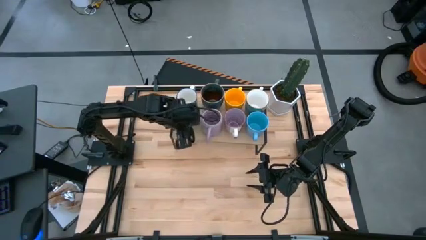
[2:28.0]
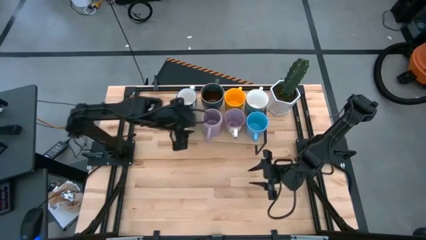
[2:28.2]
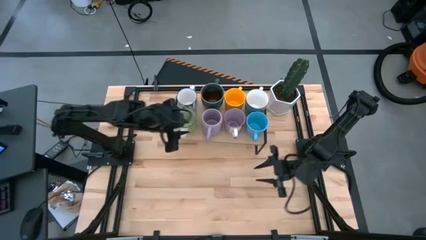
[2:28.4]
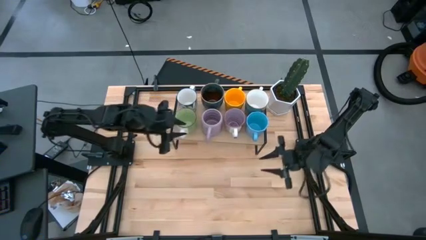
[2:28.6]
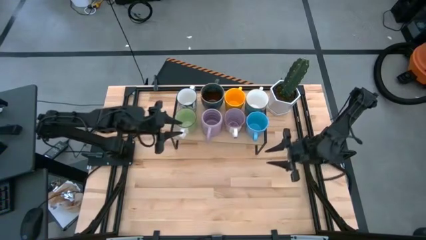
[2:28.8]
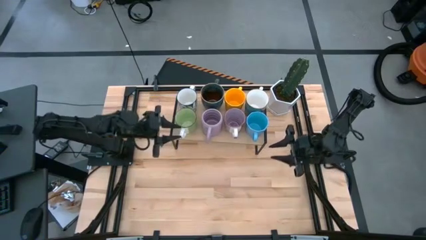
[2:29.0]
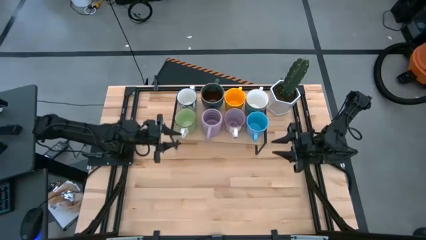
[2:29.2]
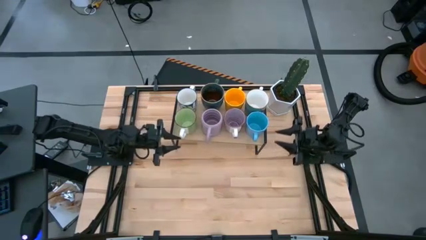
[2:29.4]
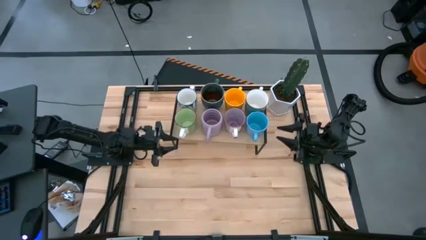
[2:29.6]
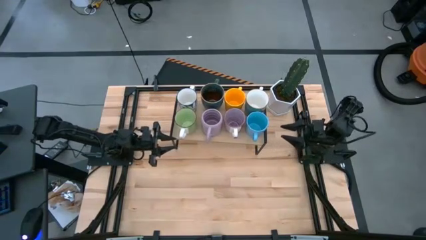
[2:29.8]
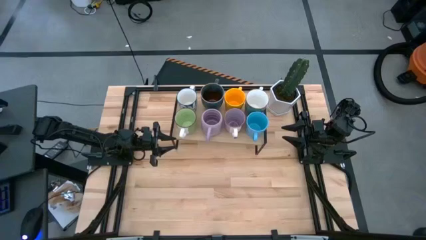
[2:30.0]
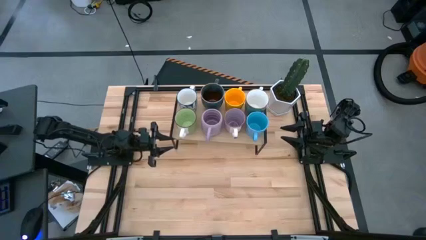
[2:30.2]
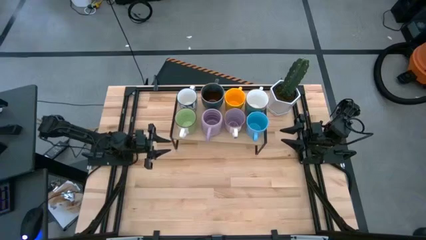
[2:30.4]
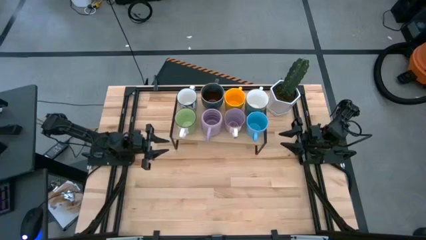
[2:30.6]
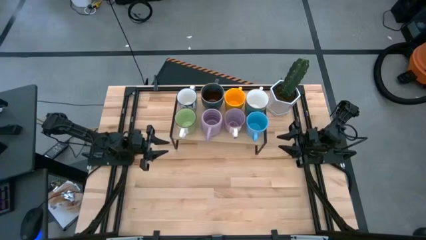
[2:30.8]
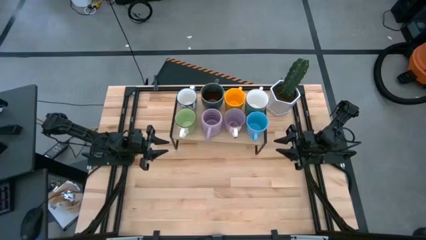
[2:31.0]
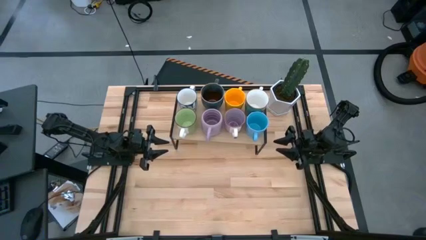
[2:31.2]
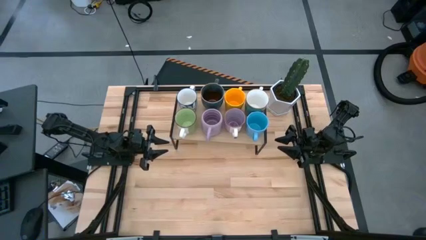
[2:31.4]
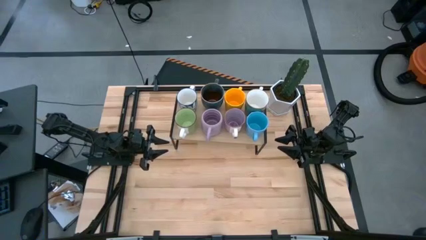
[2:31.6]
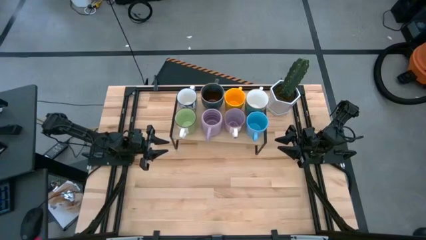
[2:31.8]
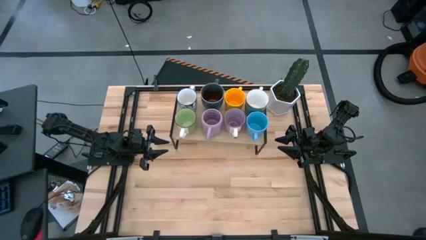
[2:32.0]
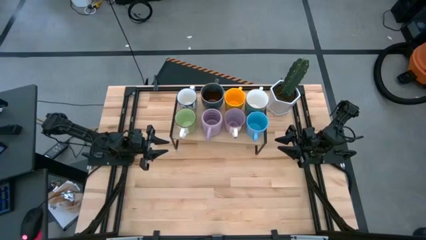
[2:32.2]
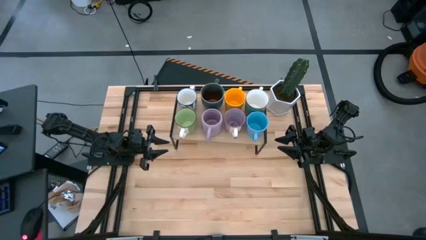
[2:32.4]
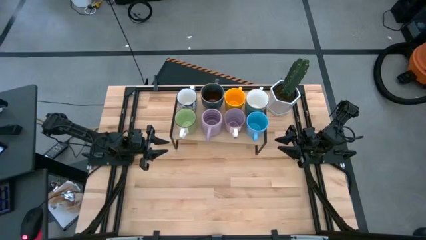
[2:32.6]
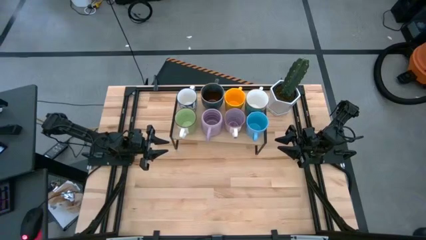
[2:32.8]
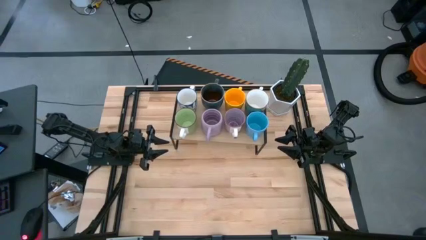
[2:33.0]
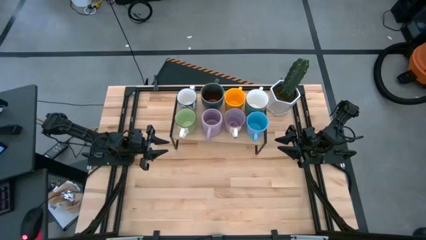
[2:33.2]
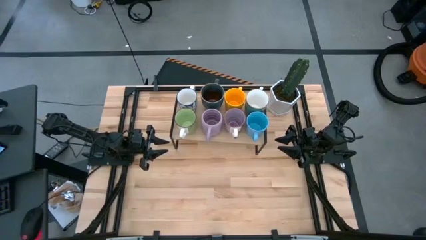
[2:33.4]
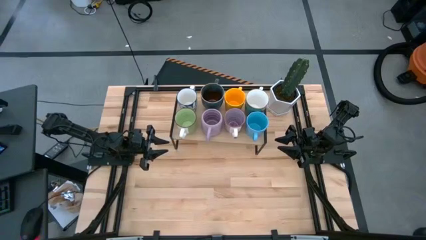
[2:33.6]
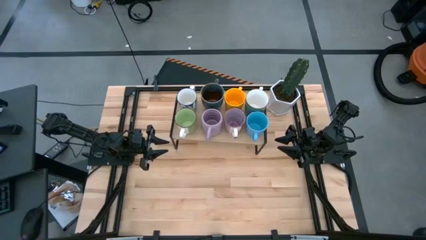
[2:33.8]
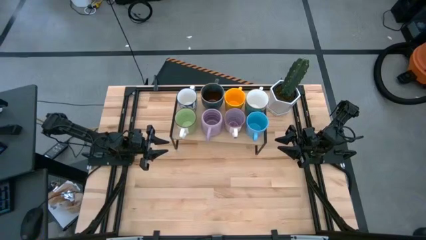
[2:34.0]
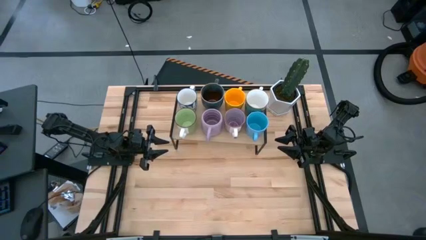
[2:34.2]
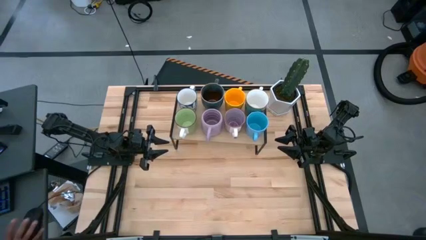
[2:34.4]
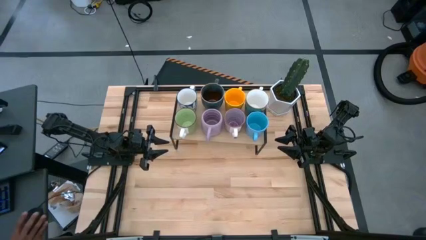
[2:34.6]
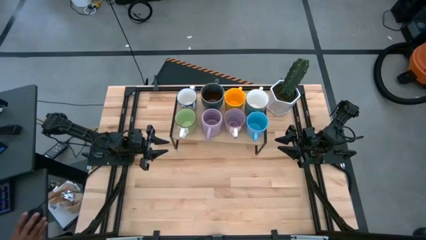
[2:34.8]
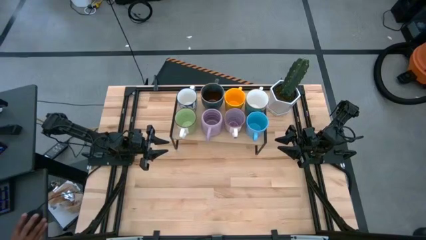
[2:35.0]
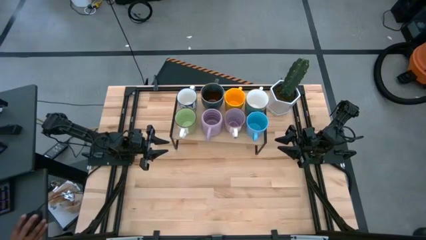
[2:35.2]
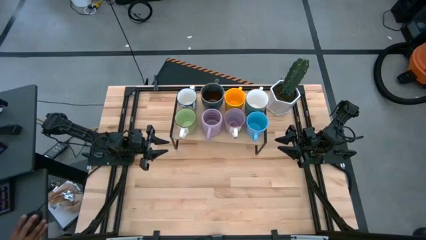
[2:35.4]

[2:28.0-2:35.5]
Task: Place coffee mugs
Return to Home Position

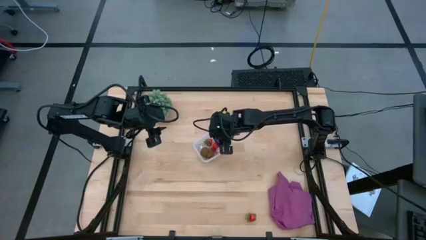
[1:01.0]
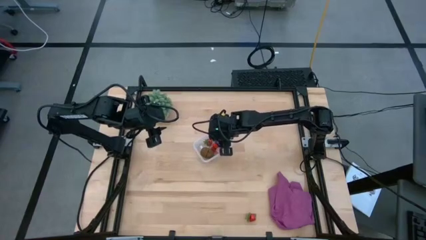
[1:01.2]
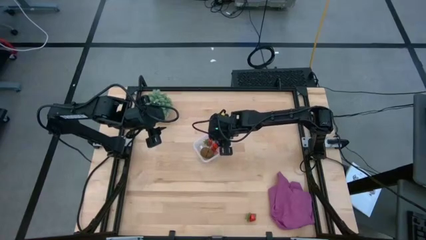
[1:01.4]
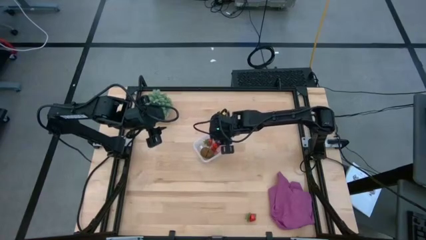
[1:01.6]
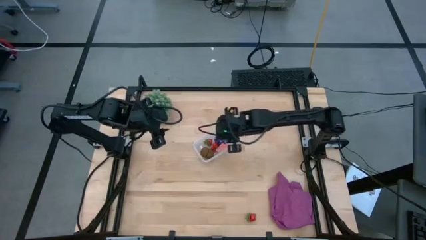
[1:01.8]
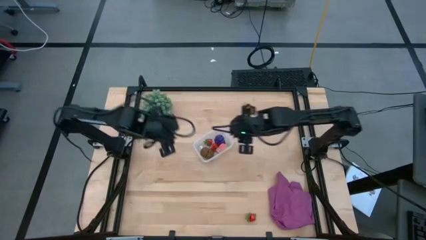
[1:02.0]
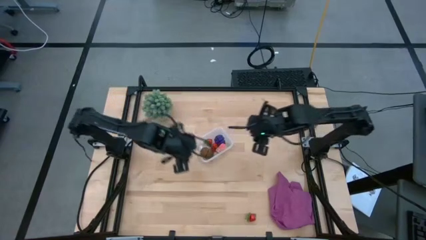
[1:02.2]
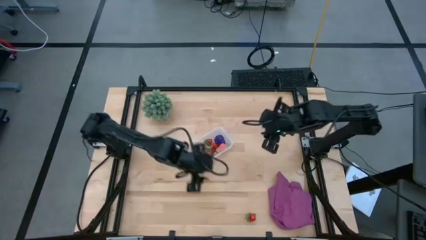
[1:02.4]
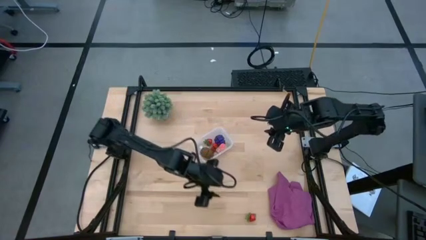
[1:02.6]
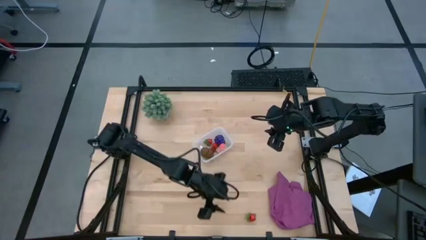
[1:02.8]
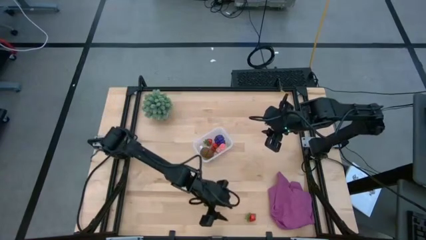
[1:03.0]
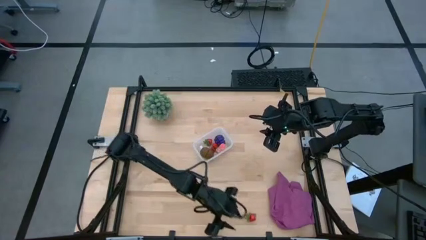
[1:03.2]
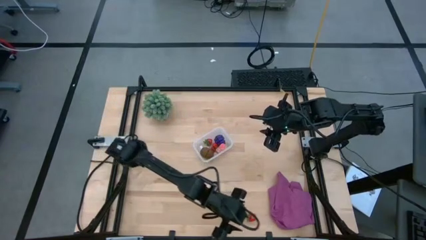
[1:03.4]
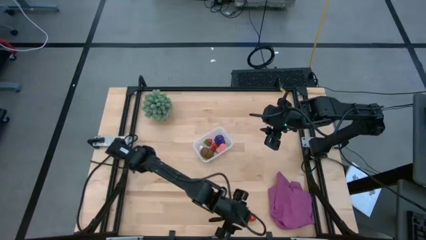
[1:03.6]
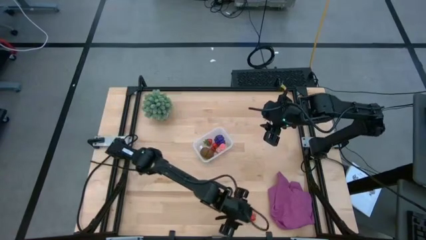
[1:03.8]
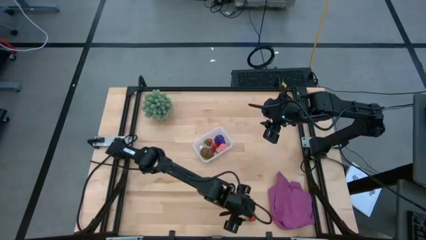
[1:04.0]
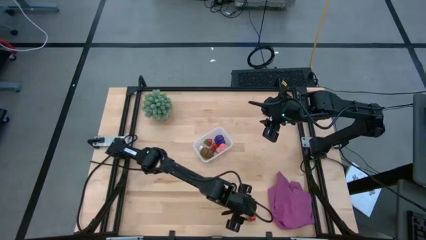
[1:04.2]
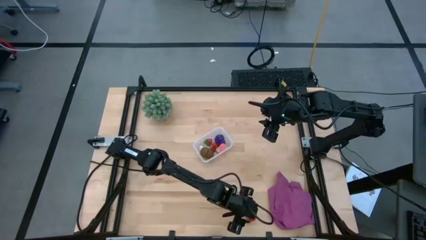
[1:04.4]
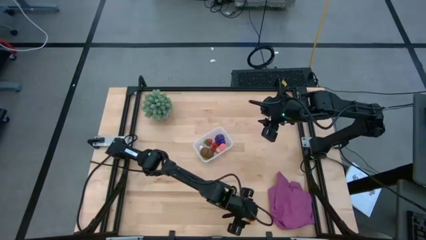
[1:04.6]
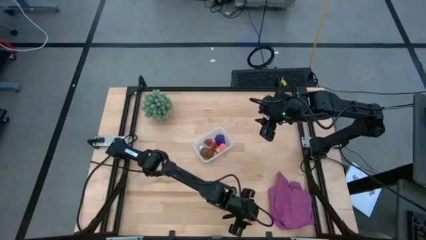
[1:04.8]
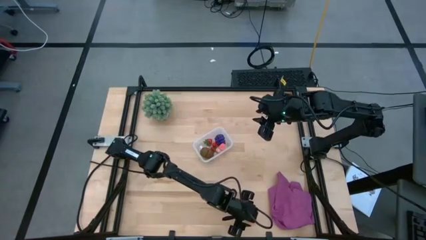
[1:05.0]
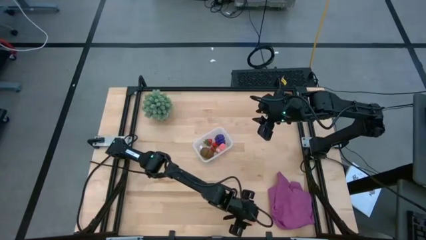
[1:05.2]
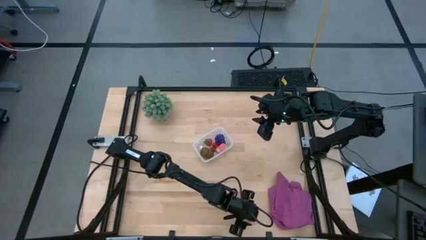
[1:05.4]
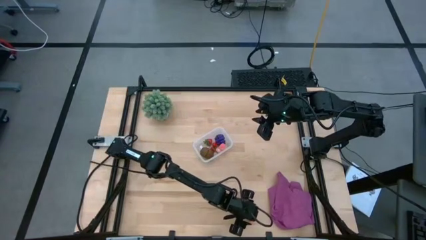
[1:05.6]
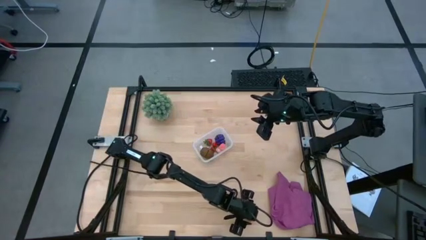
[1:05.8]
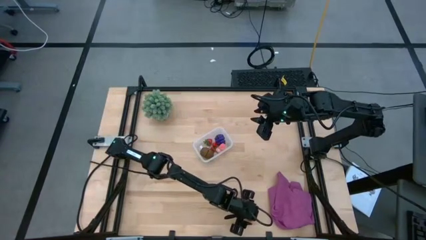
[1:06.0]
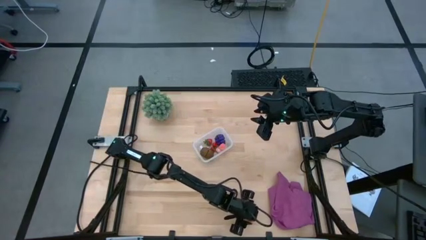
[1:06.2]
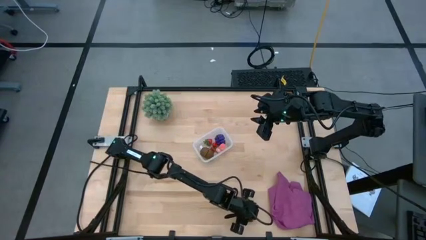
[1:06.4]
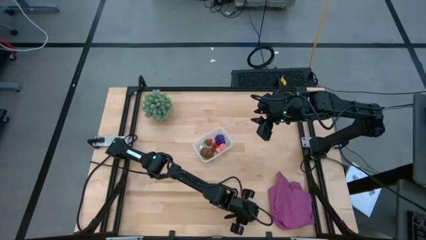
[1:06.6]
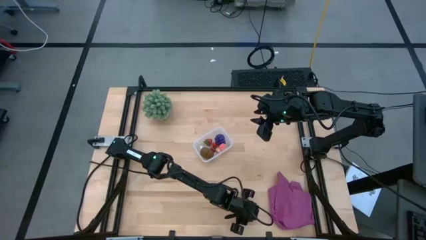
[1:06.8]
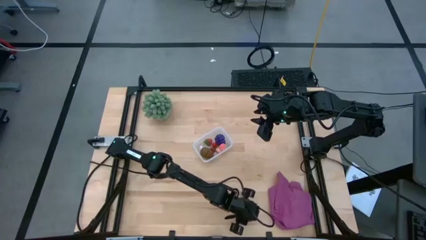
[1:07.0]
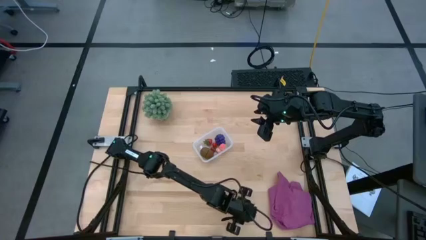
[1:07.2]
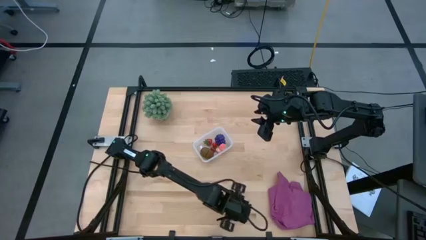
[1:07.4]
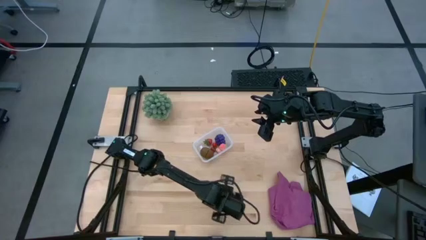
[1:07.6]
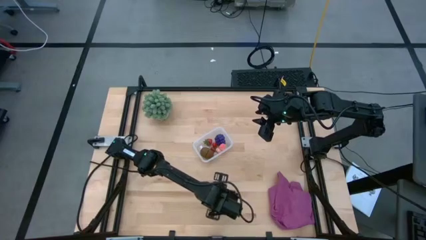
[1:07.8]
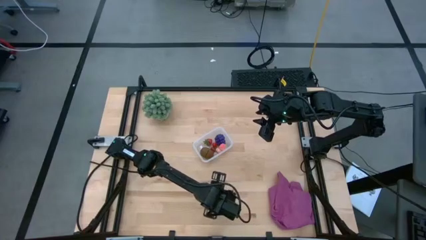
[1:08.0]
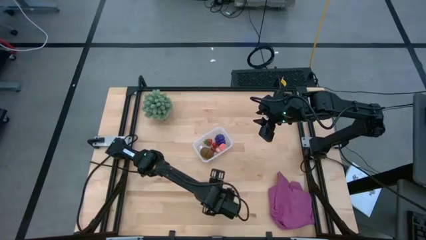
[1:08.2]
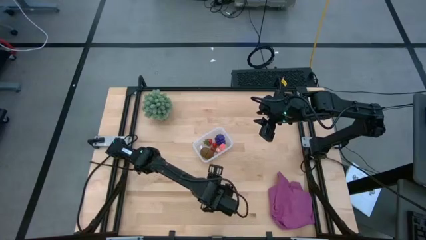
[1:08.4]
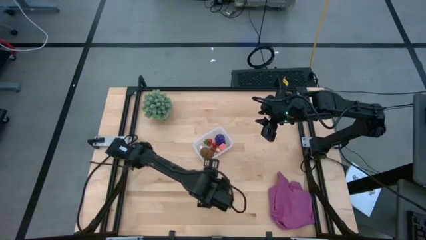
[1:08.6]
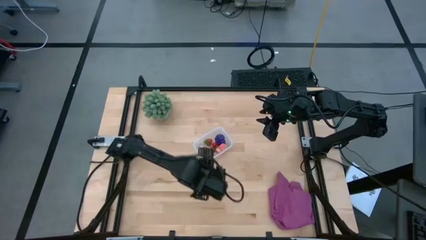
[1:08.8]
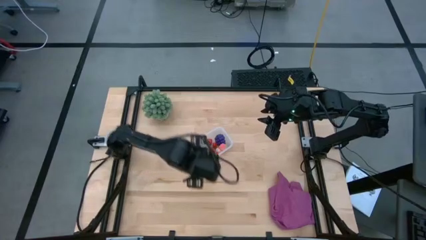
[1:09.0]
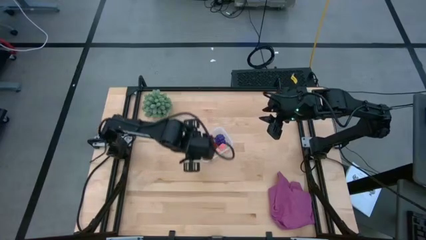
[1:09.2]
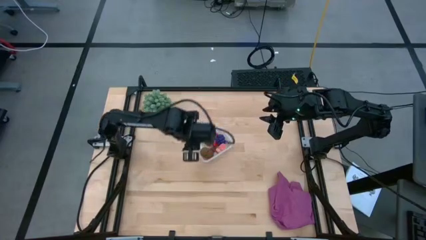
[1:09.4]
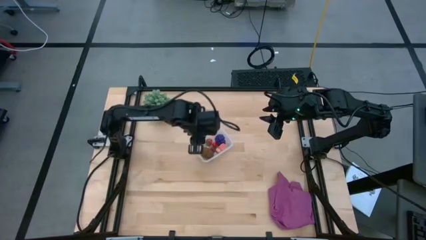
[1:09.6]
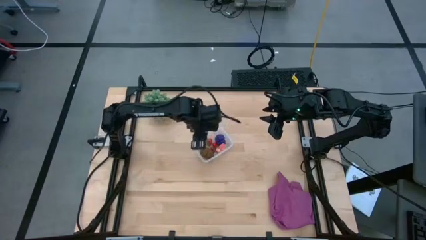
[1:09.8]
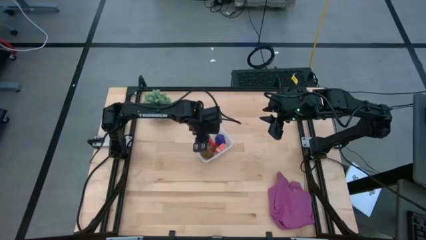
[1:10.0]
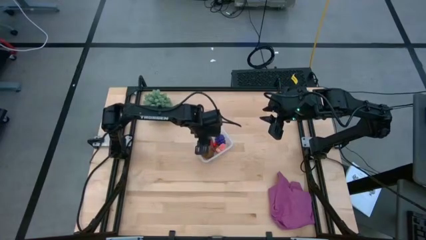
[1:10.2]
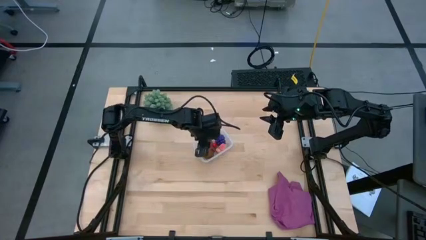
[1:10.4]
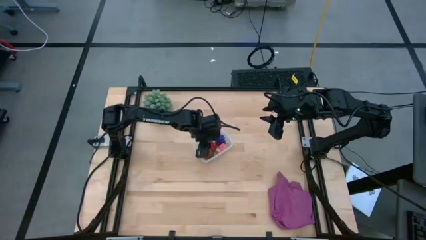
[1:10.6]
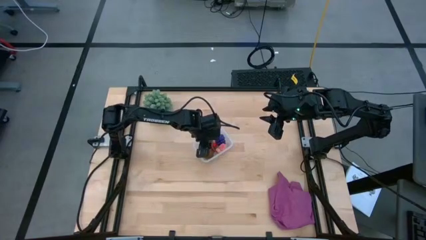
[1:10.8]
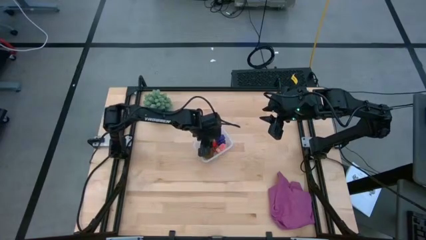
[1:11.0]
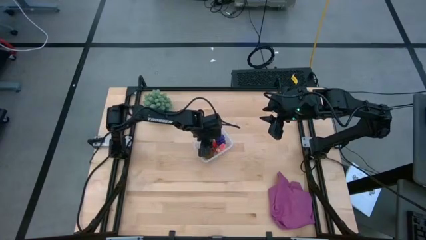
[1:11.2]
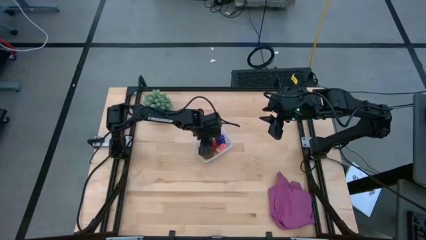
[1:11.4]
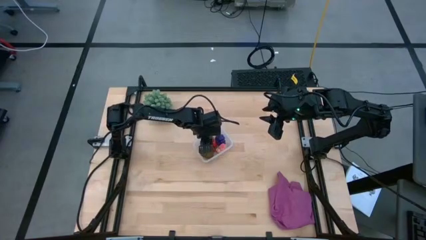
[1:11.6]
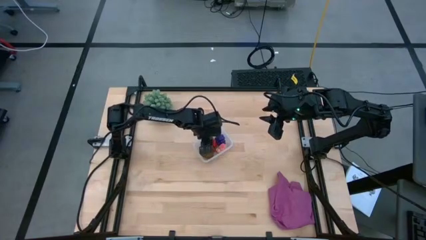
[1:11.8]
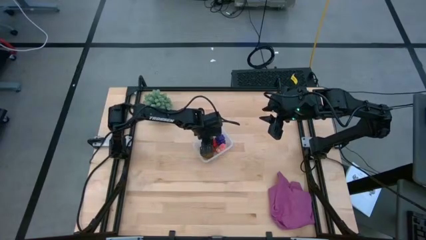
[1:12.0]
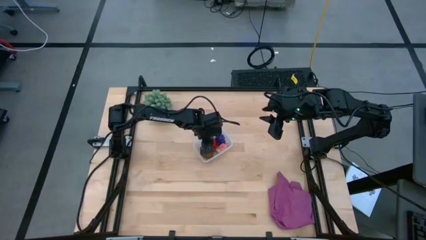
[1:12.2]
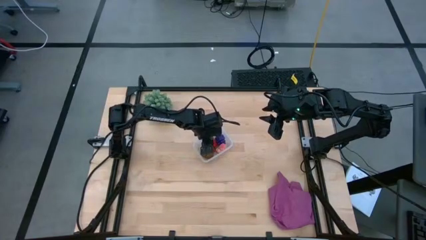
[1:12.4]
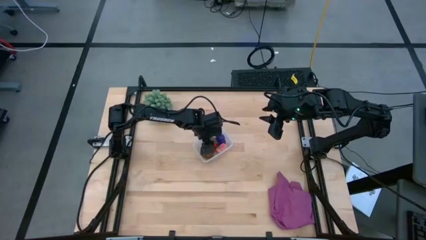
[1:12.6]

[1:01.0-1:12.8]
Task: Pick and placing Produce into tupperware
Put the strawberry into the transparent bin
